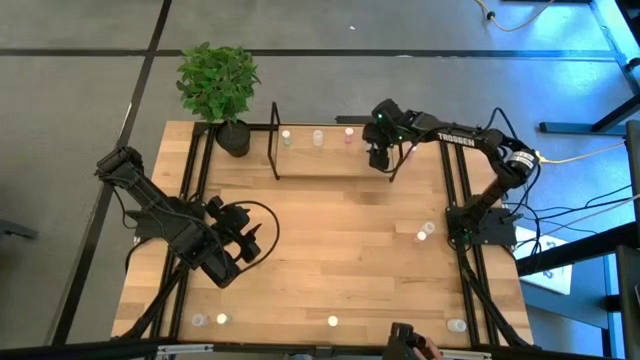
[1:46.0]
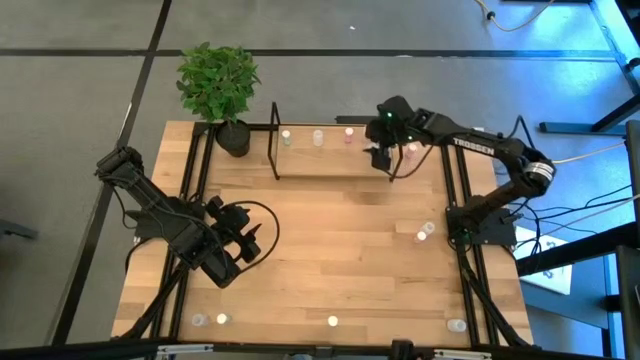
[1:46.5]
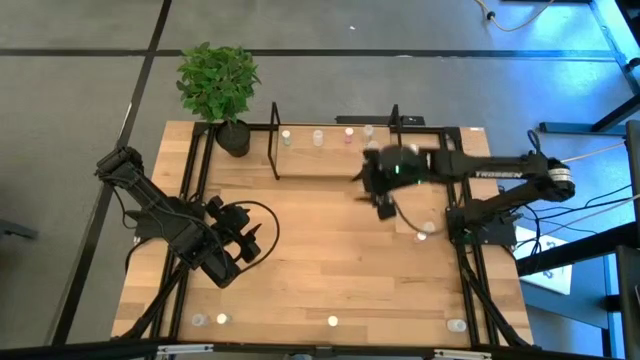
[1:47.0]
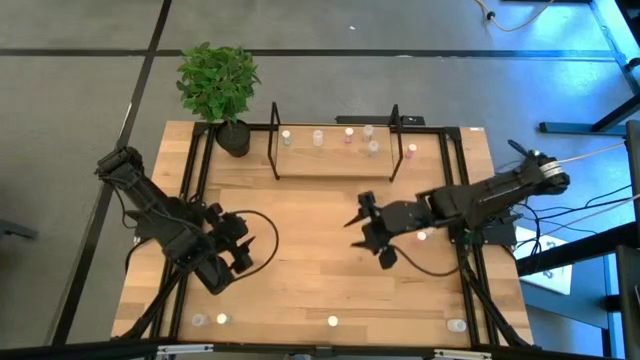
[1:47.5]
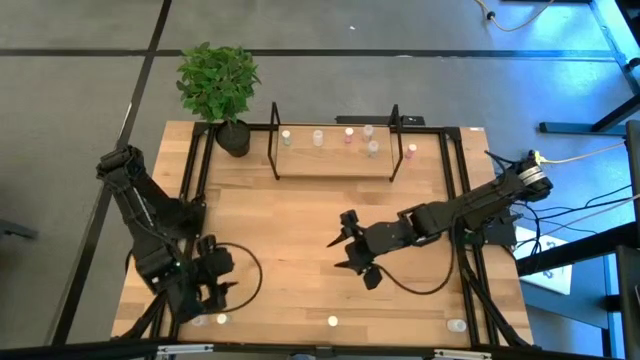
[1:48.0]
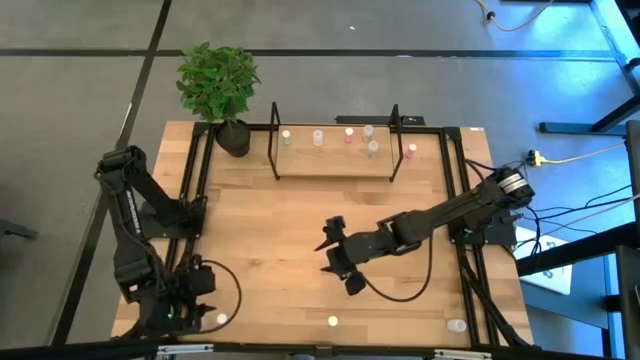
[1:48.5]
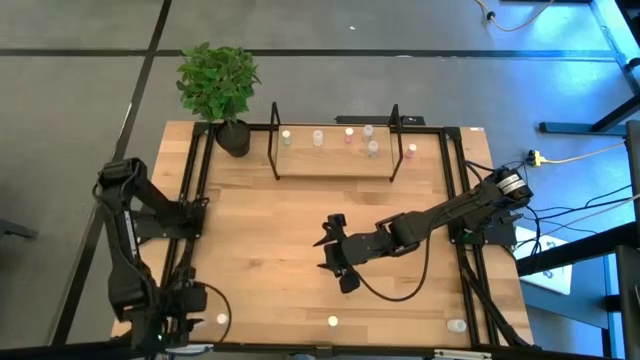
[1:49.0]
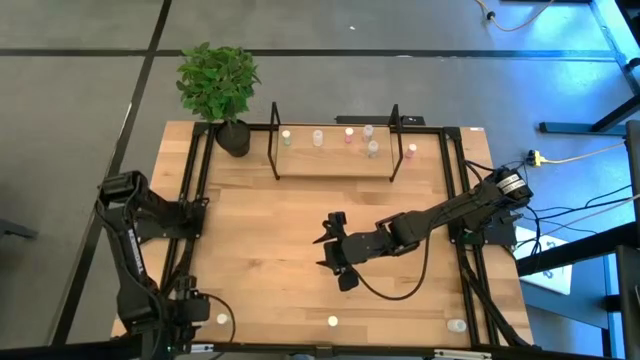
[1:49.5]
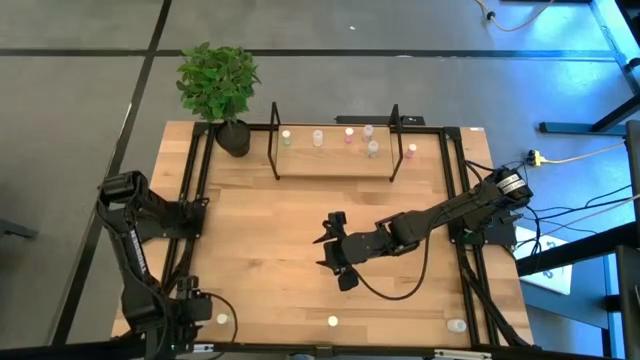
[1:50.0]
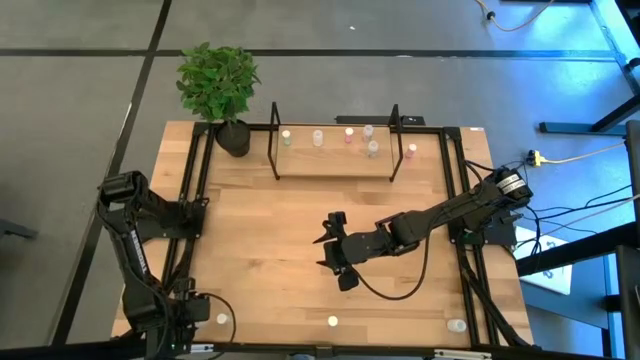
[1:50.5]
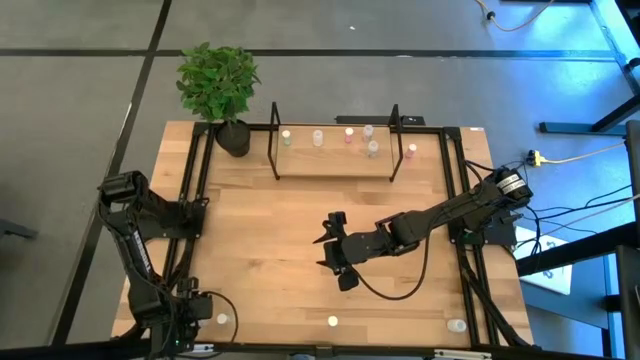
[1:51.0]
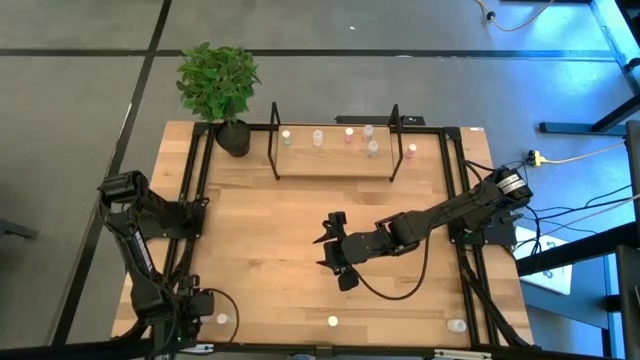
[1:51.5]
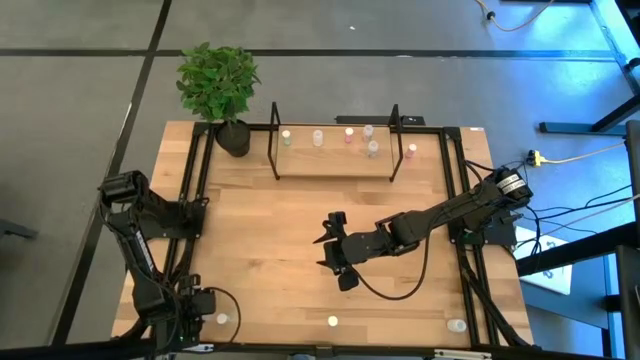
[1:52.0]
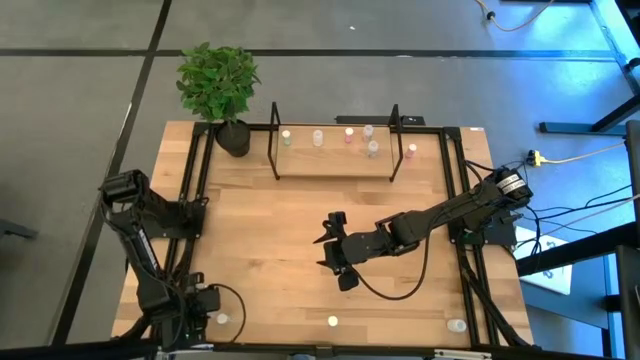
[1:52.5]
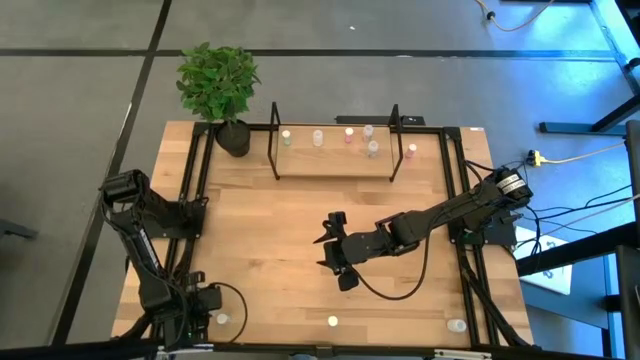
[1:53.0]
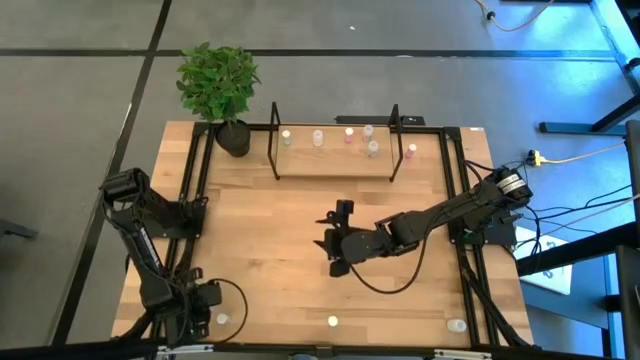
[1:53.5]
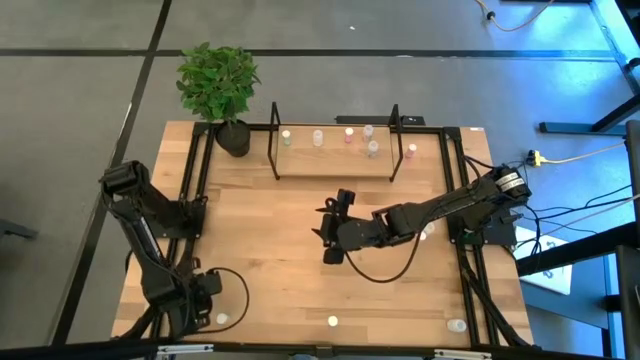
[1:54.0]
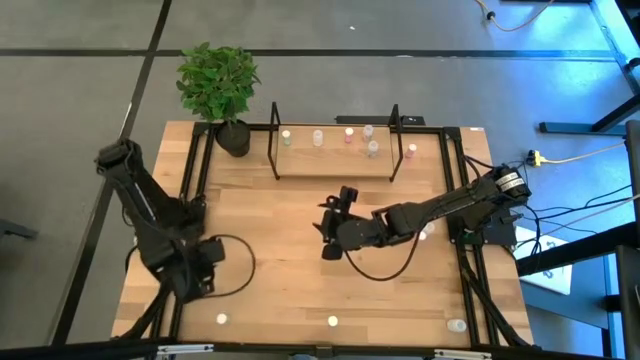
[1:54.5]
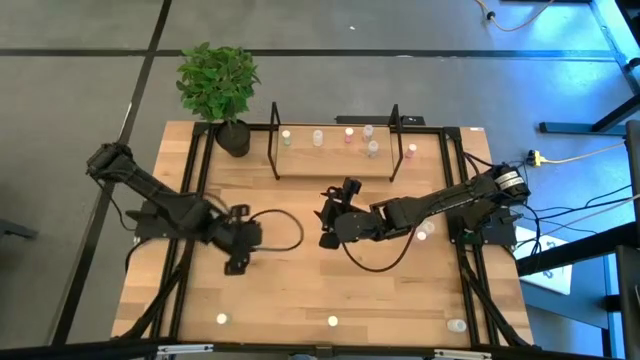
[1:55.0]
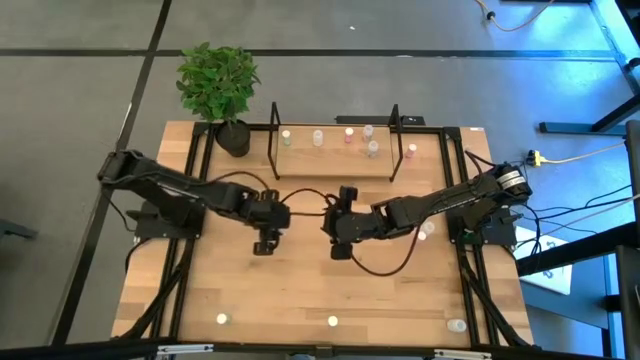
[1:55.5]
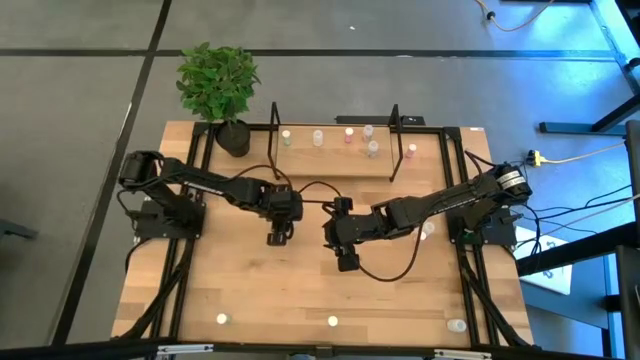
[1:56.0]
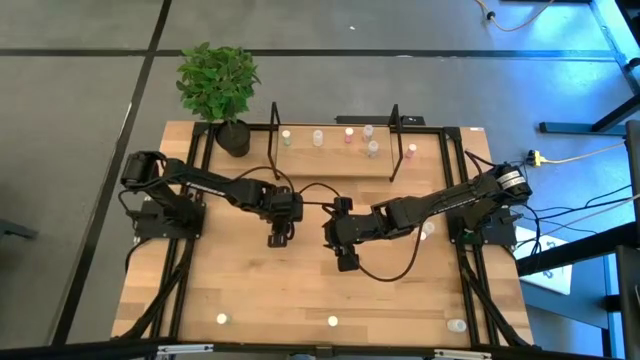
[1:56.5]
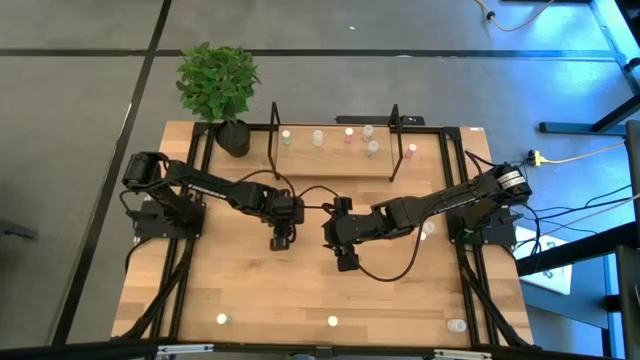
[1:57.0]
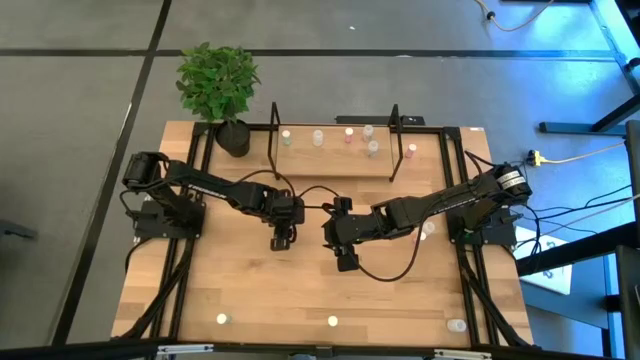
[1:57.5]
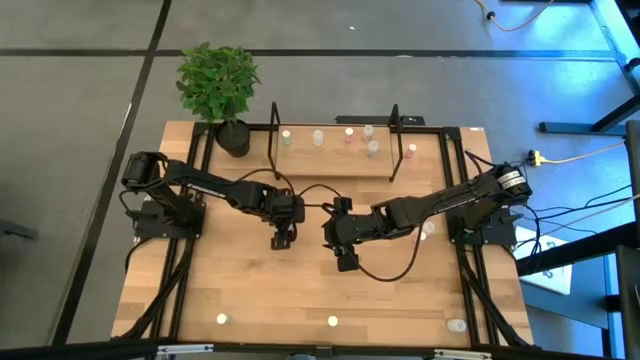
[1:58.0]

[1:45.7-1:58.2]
Task: Pick and place medicine bottles onto shelf by color
Put the transparent medicine bottle on the shelf aligned with the other transparent medicine bottle

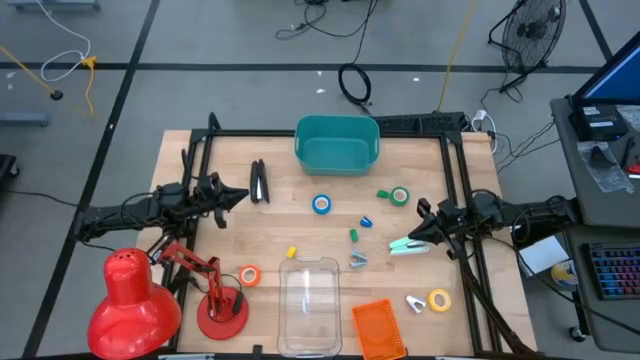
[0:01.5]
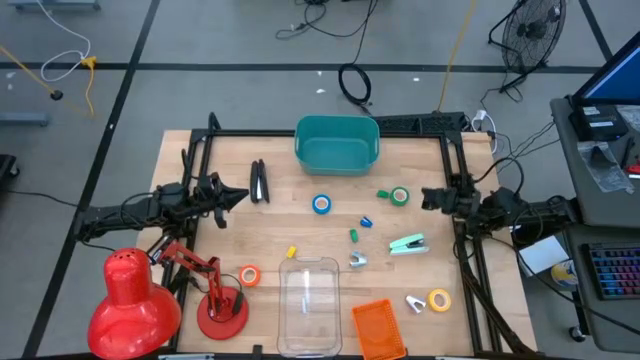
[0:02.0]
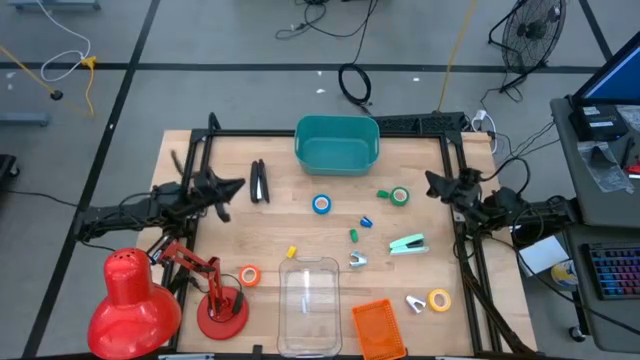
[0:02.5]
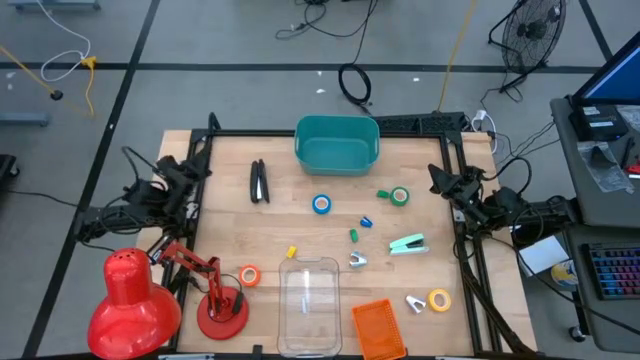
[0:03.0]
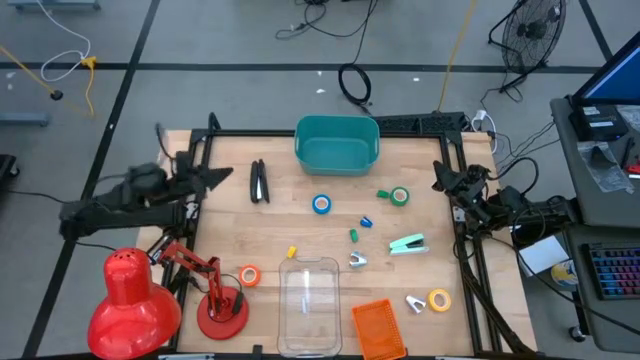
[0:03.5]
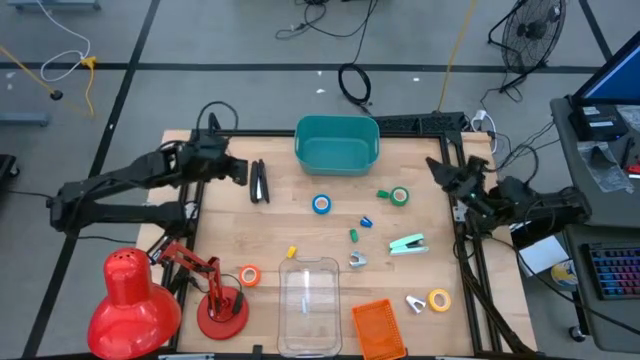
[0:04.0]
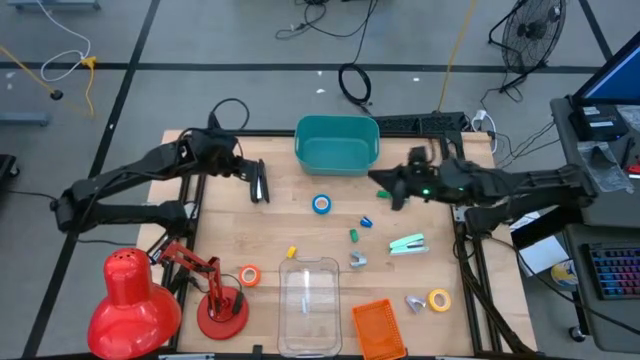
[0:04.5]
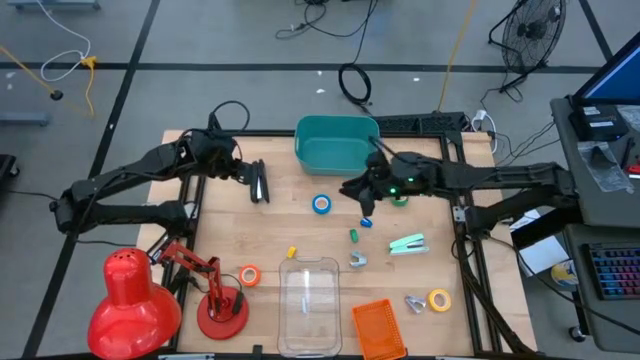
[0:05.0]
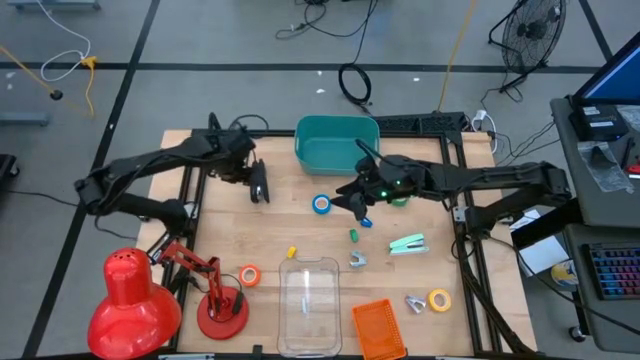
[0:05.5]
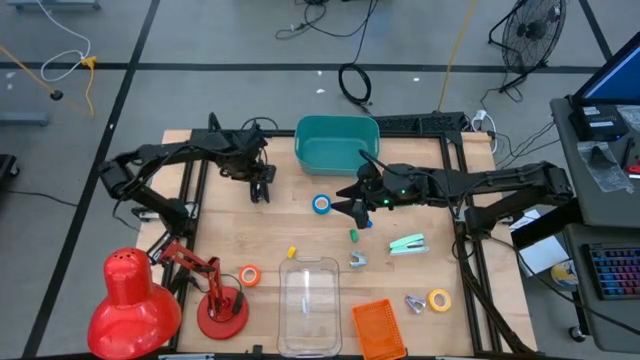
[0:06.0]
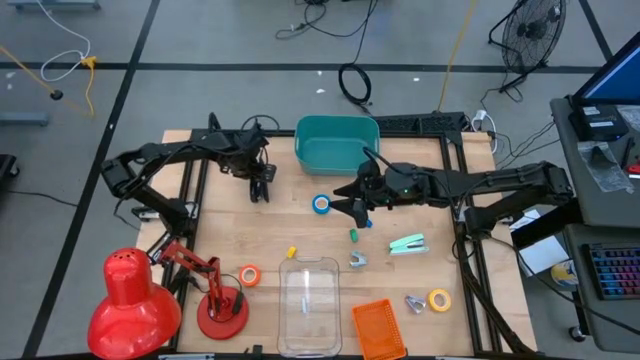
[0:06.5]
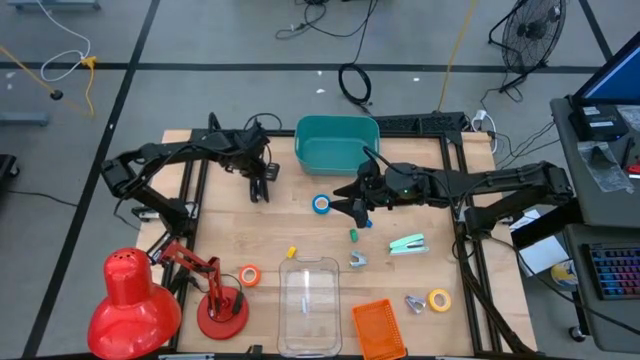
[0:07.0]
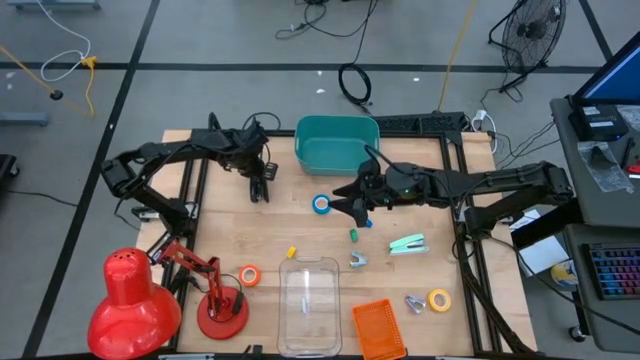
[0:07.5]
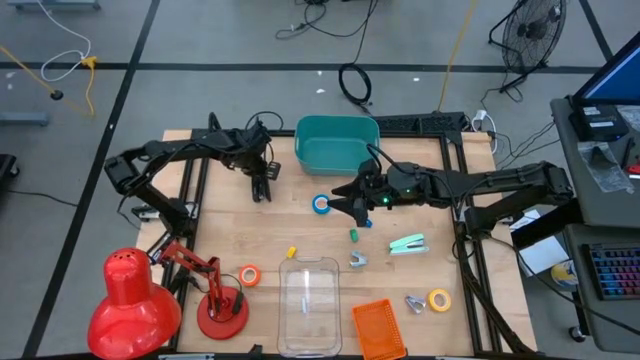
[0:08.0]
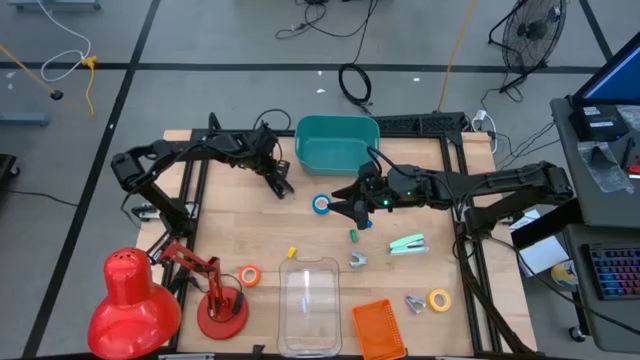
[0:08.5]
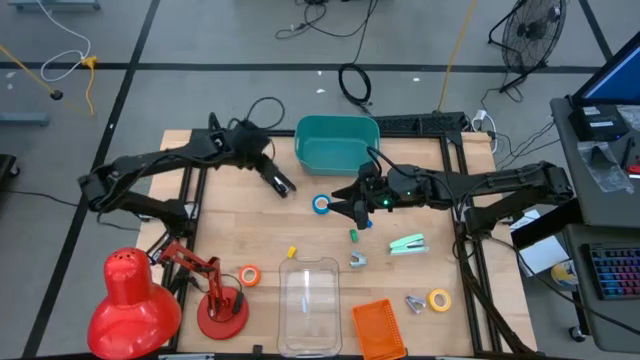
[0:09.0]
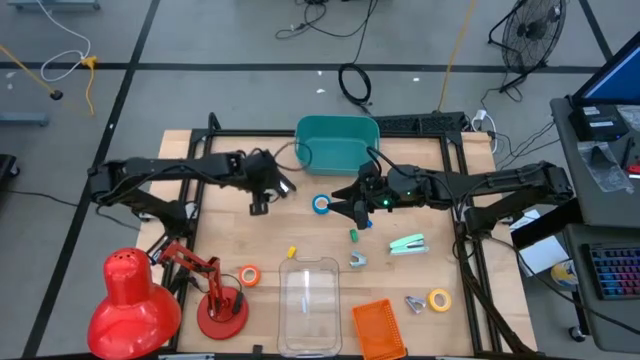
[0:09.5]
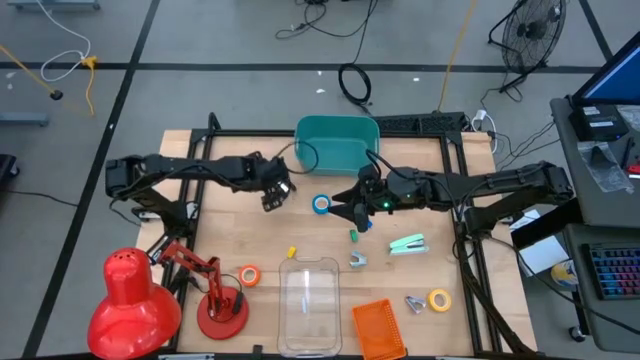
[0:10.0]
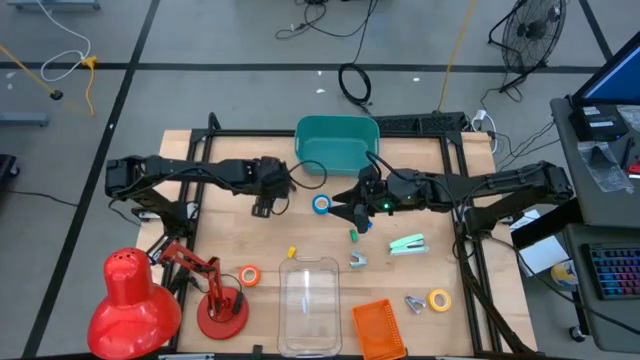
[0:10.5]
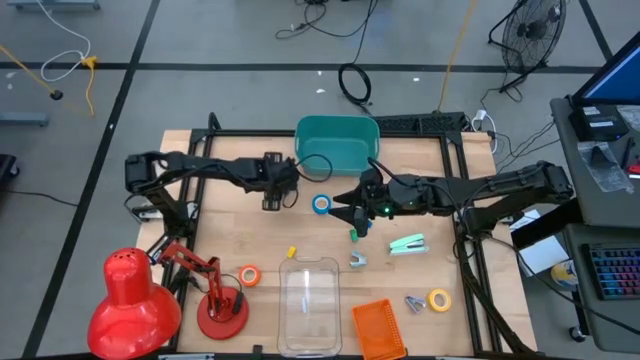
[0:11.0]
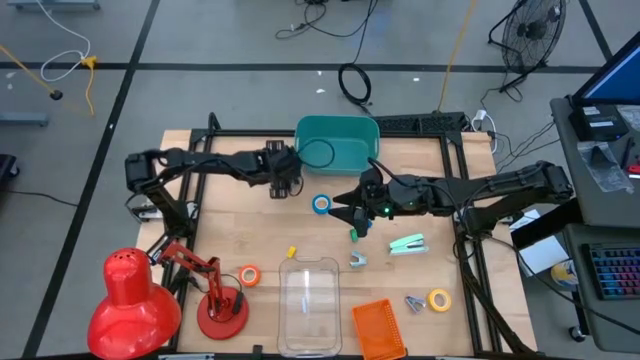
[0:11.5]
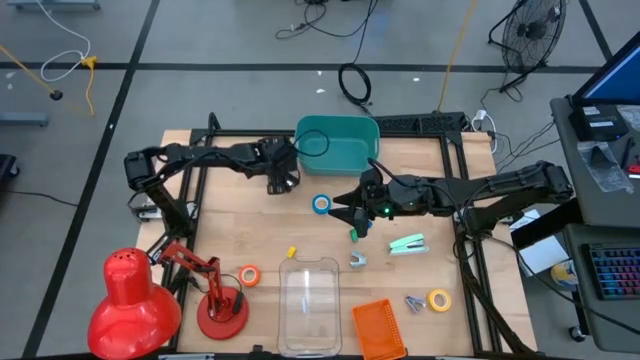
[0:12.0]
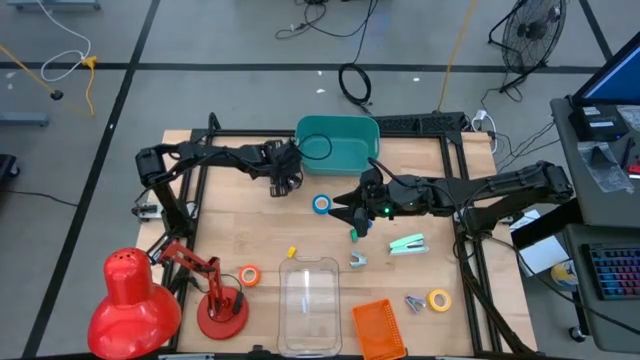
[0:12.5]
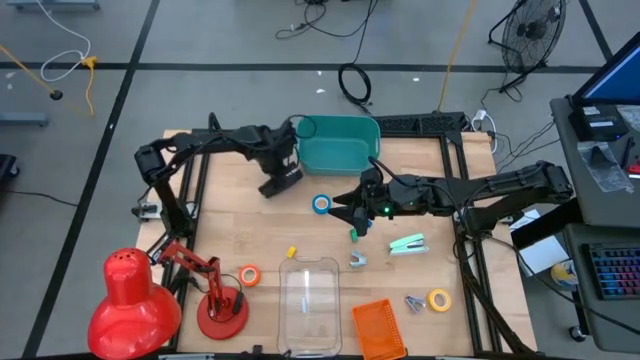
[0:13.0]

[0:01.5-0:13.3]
Task: Pick and place Stapler, Stapler remover, tape
Put the black stapler into the green bin
